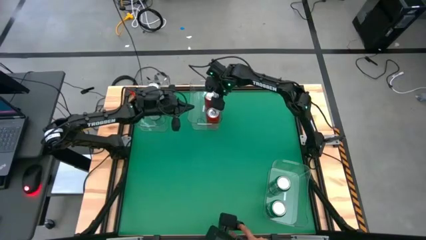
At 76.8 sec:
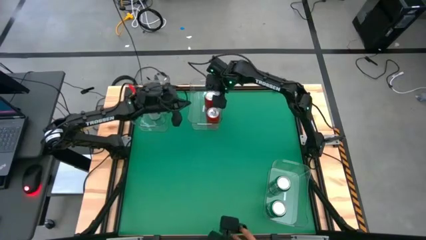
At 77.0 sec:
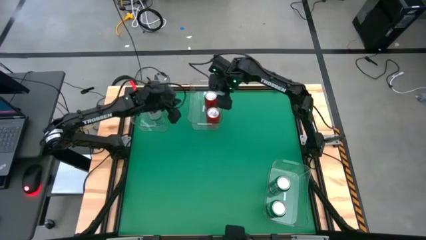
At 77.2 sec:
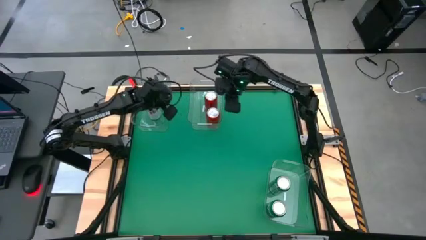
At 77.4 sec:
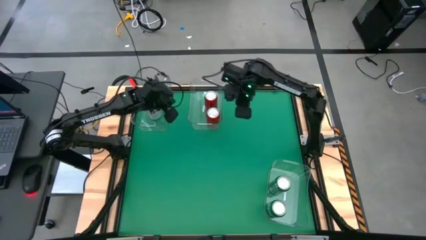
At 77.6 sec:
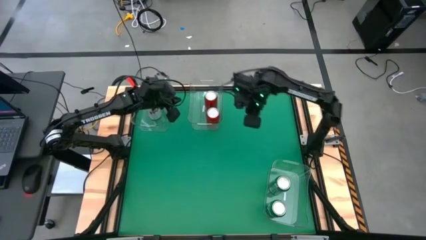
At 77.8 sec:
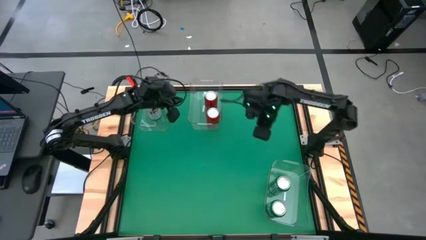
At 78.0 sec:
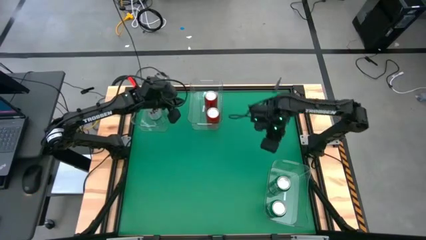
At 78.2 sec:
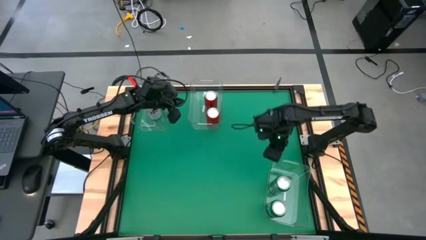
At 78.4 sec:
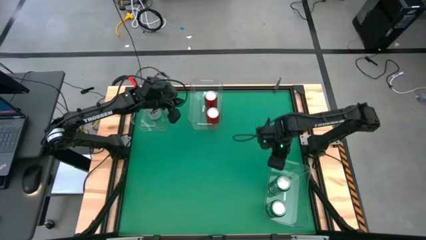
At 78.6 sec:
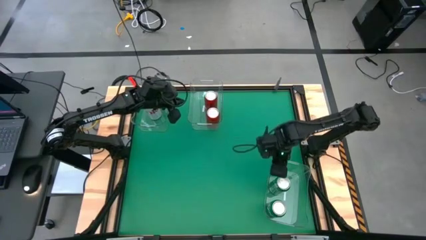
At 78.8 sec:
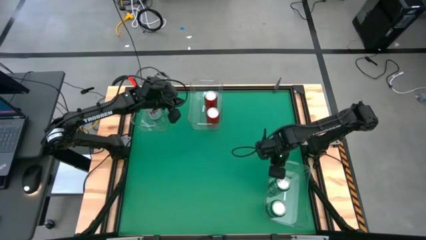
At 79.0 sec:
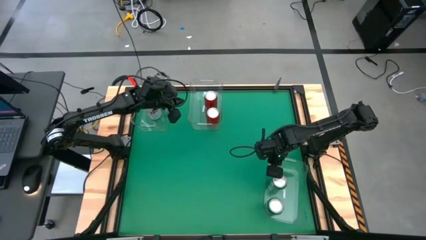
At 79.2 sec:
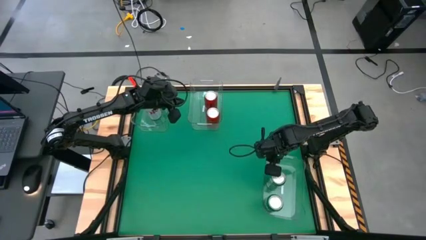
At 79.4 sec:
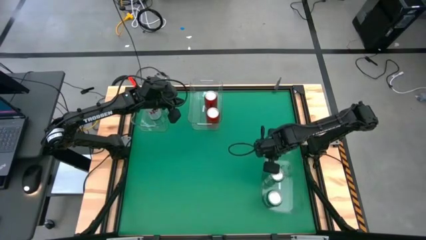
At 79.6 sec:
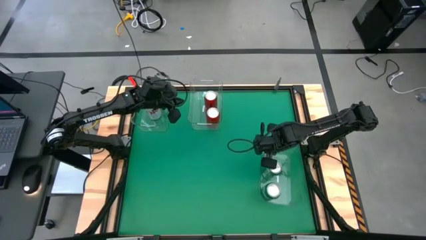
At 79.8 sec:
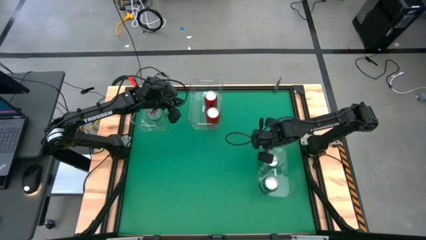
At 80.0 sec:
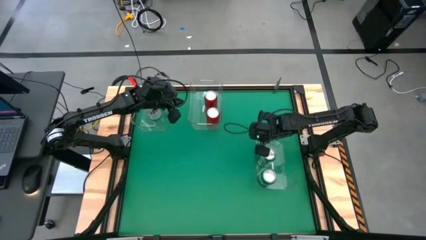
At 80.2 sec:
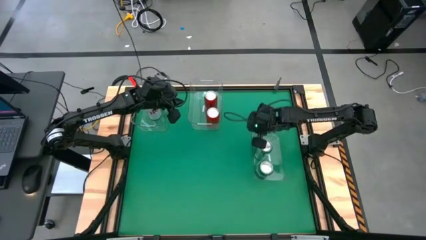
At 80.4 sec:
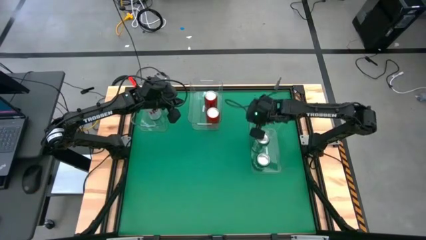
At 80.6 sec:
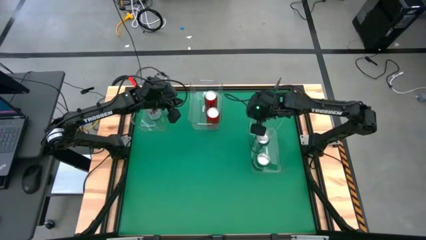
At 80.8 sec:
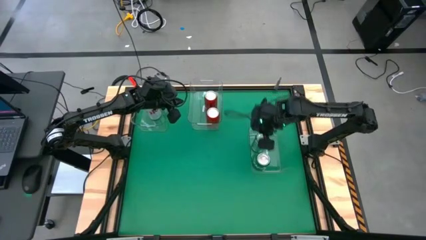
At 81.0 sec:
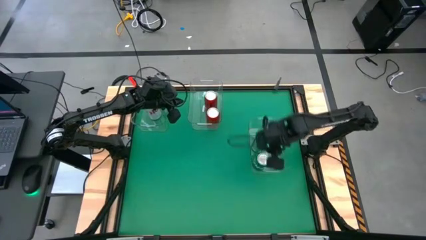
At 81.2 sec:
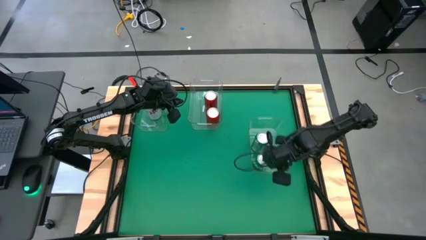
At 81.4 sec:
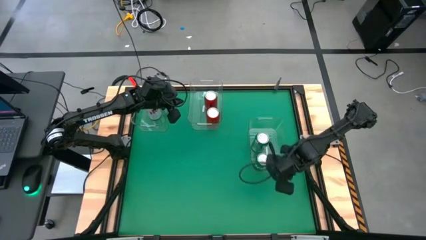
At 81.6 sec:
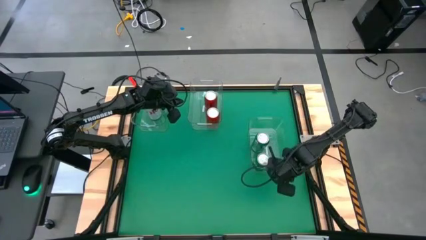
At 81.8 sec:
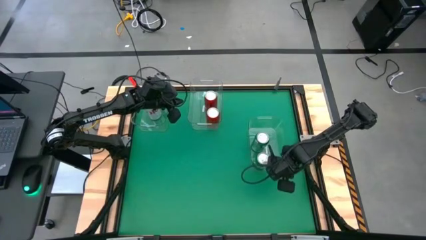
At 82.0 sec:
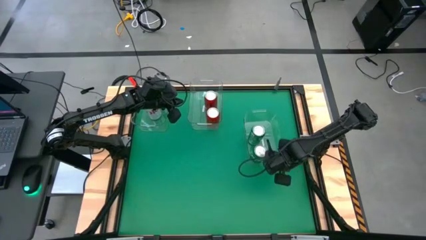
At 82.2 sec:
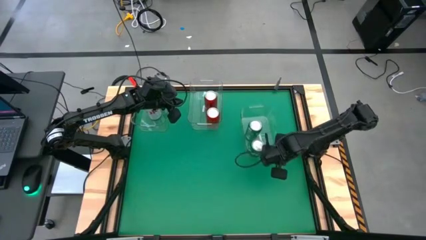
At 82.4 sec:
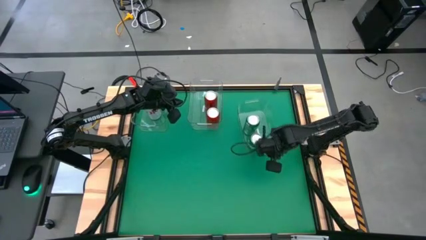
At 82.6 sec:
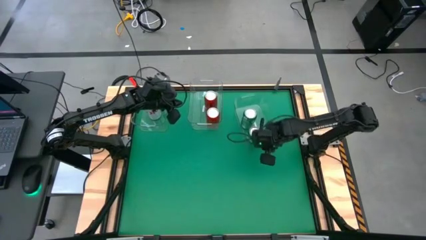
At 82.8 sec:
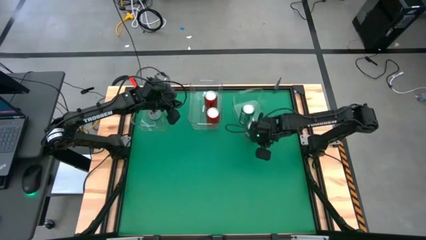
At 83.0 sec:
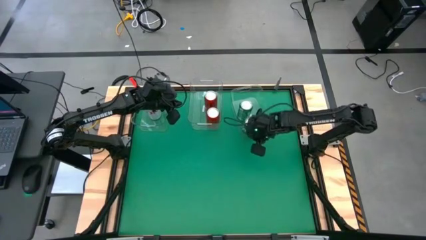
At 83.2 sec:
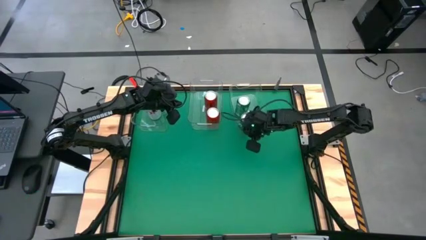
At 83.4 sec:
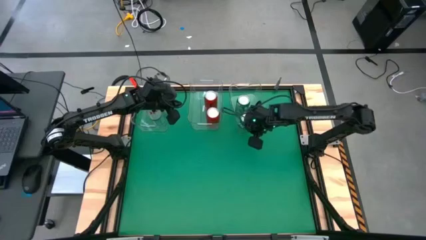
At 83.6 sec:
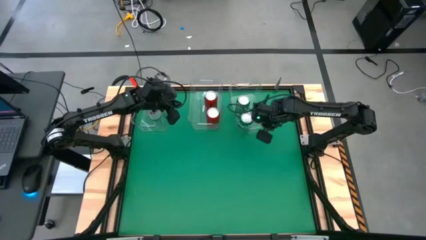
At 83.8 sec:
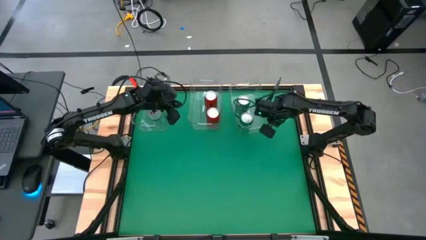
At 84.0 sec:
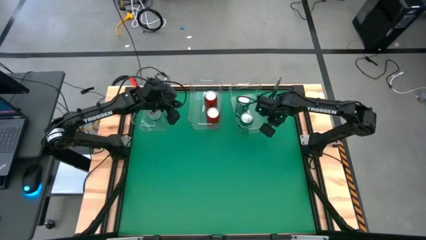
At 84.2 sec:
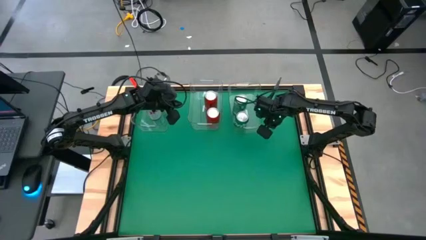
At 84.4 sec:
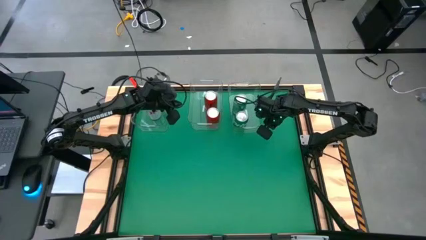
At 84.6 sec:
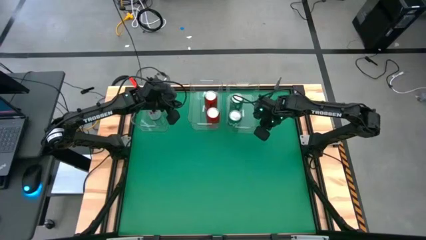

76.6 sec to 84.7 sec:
Task: Sort soda cans
Move the bottom right transparent bin to the right of the middle transparent bin

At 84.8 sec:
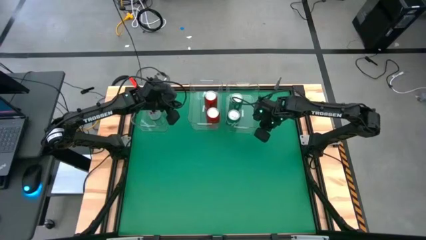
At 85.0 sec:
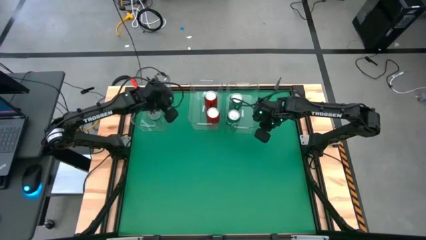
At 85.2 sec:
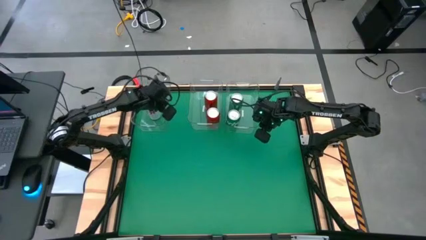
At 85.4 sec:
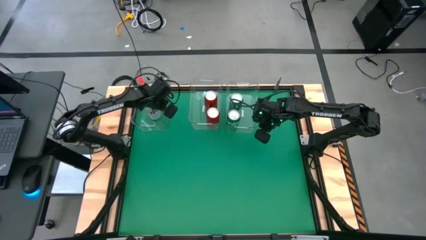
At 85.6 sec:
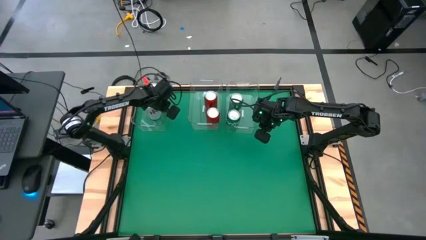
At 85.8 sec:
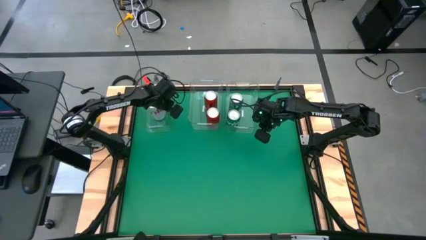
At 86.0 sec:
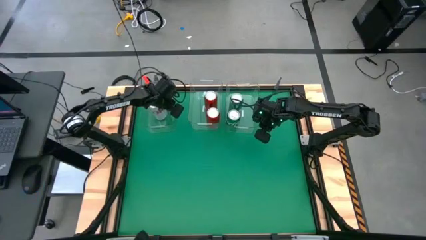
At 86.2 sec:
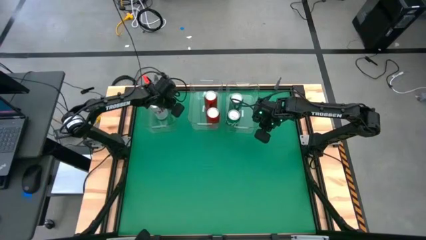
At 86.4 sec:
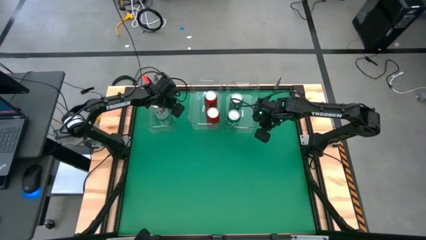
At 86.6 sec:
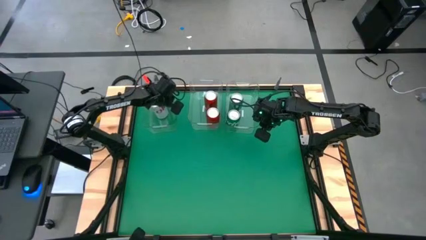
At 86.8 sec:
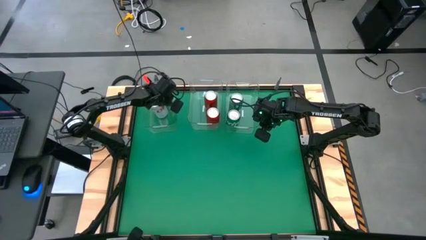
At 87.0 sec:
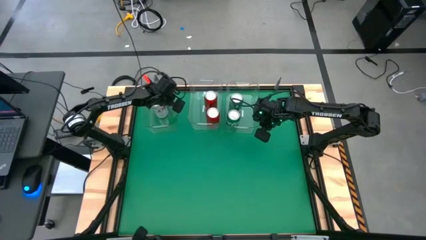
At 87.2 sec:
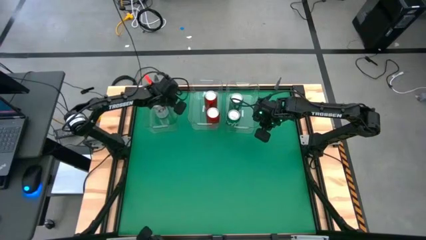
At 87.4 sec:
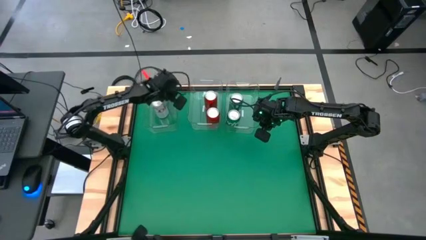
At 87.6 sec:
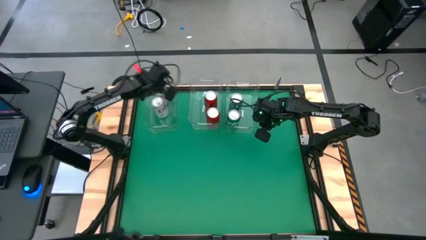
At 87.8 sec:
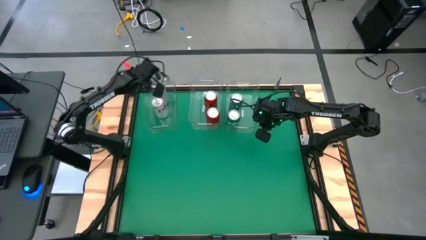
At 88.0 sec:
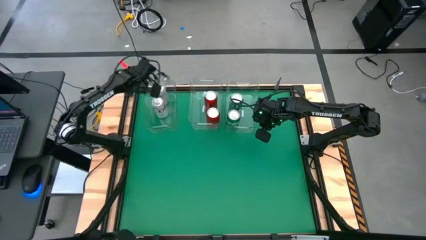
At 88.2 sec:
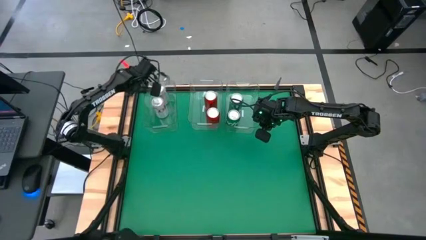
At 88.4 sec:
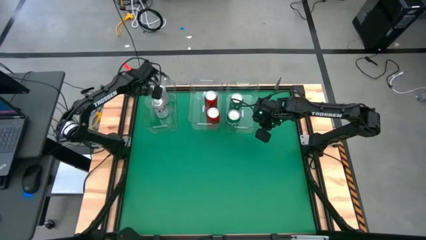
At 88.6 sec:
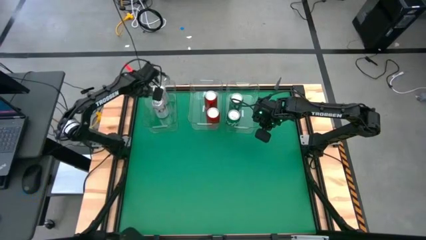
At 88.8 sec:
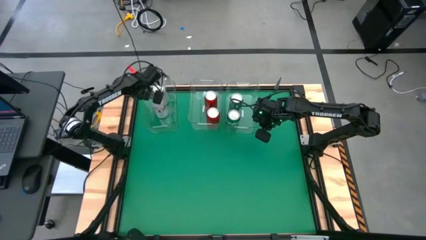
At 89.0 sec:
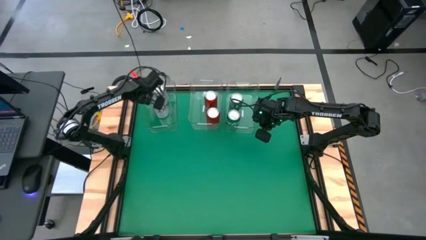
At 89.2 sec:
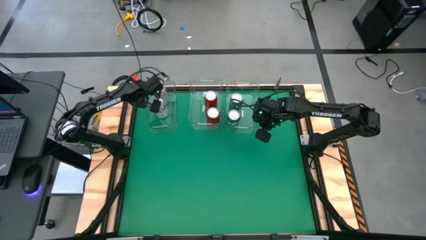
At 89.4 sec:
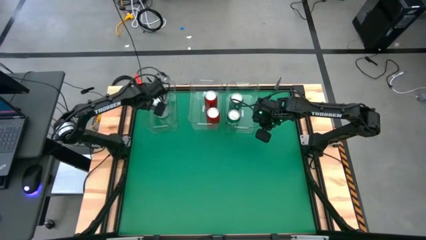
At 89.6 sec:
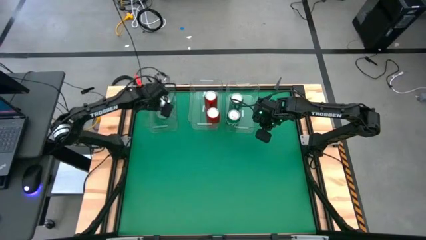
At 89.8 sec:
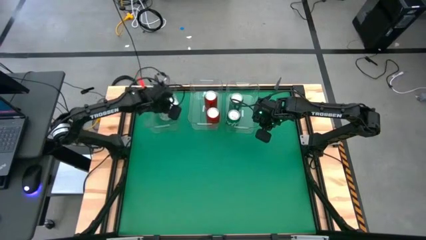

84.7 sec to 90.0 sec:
Adjust the left transparent bin

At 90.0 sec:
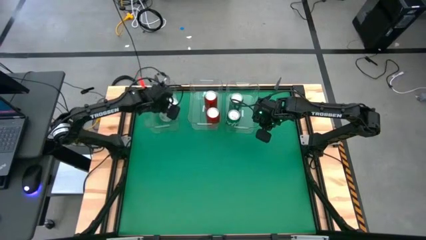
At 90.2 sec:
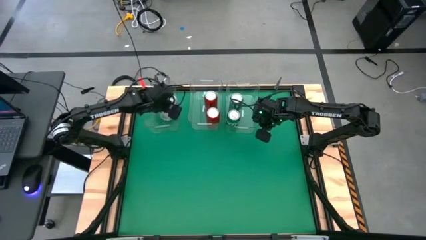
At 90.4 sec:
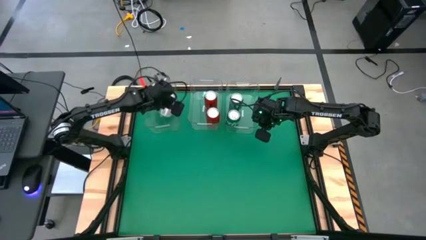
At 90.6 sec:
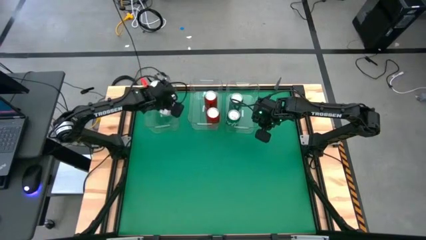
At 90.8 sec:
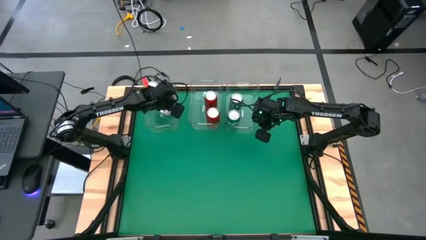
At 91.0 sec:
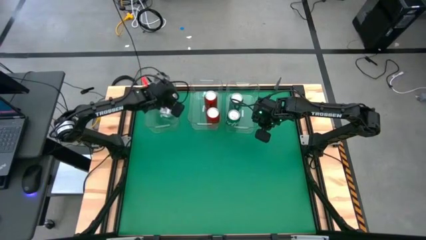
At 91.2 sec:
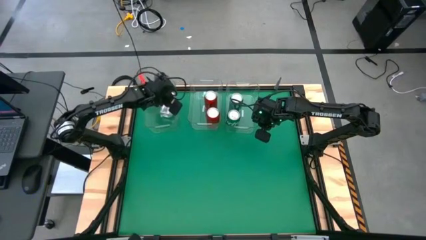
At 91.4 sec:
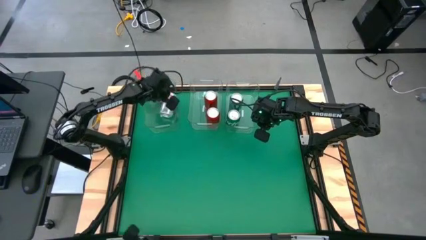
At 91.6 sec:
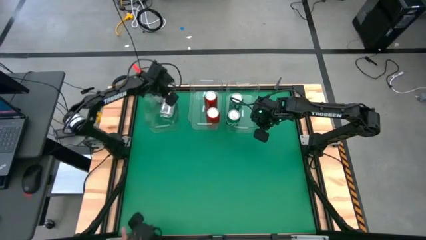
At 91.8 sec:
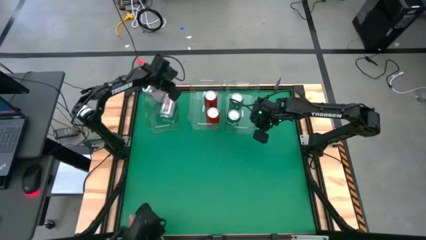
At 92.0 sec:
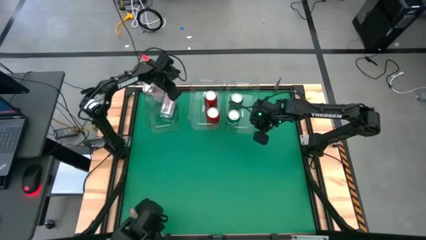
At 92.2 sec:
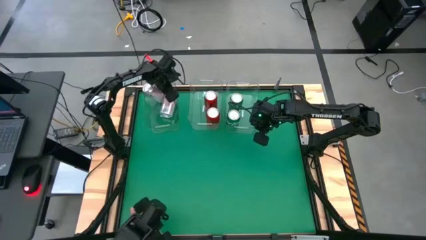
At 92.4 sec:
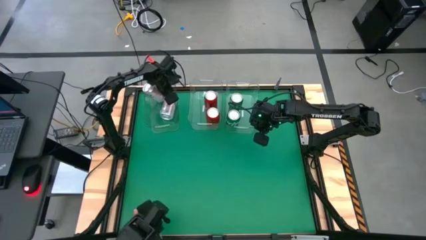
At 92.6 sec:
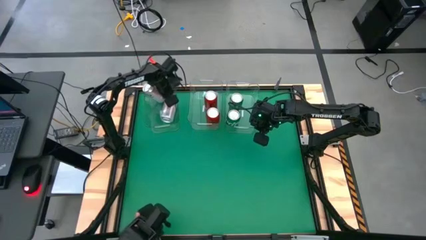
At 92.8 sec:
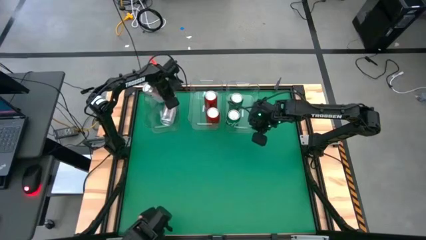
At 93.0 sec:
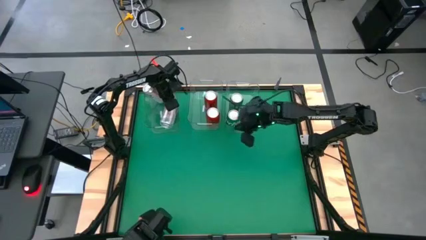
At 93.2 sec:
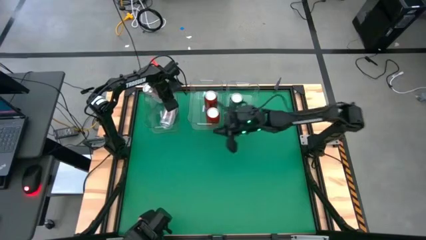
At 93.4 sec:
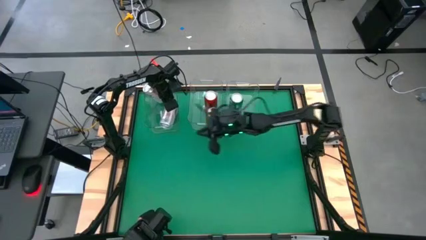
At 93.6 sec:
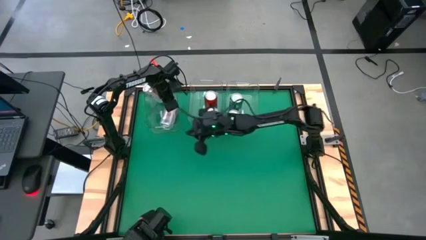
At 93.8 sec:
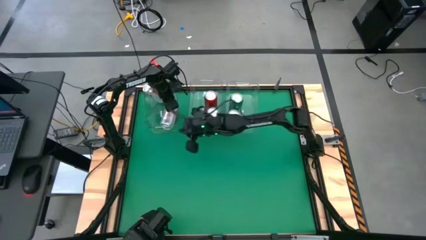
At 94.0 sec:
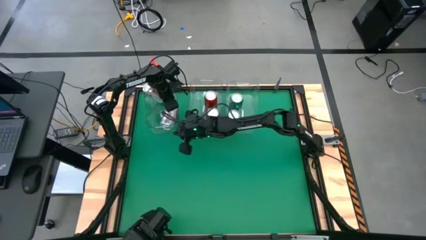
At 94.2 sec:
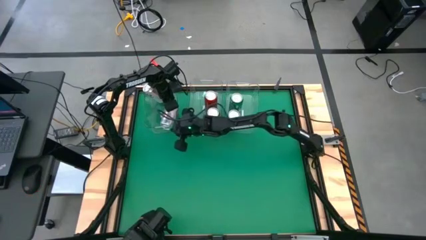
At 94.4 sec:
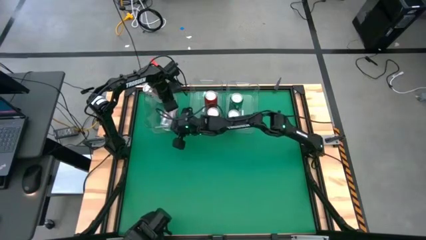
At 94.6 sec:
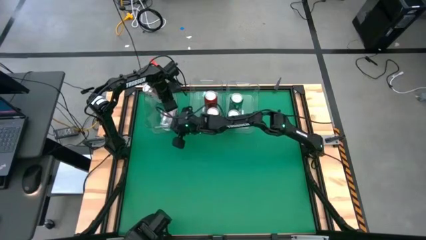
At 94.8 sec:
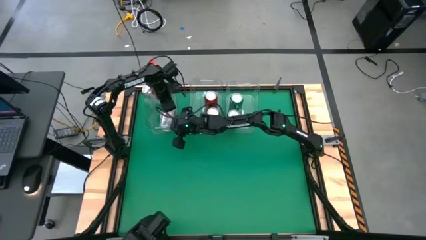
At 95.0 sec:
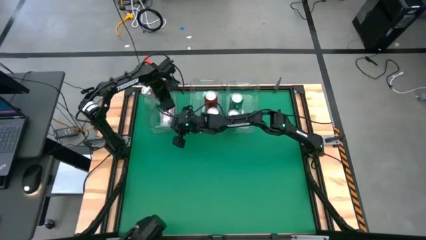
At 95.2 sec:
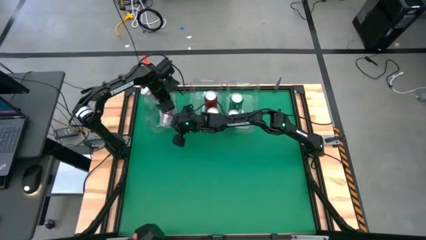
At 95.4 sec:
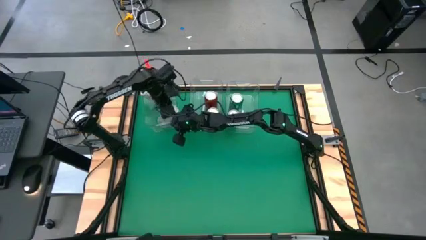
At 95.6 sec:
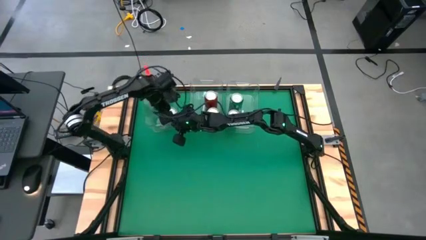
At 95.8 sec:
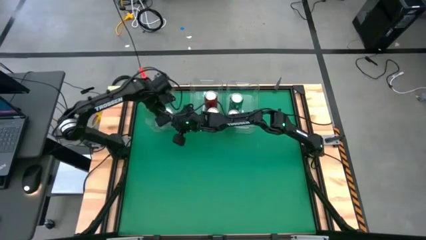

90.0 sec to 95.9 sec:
Adjust the bottom red-silver soda can
